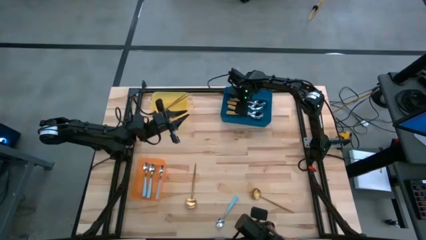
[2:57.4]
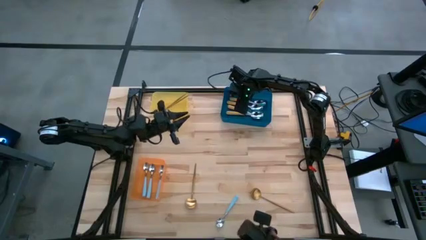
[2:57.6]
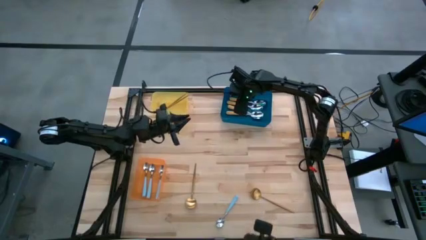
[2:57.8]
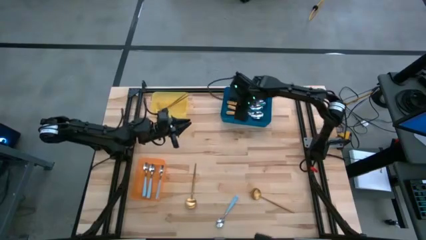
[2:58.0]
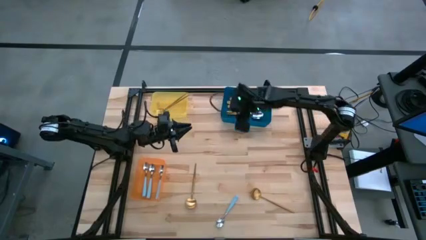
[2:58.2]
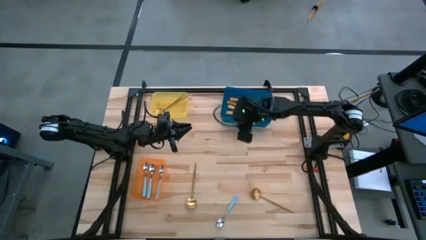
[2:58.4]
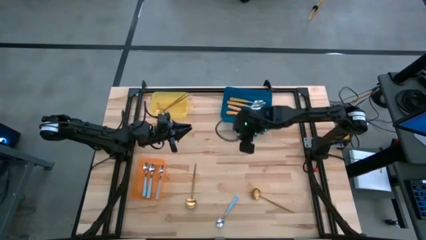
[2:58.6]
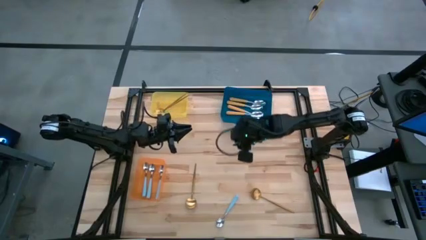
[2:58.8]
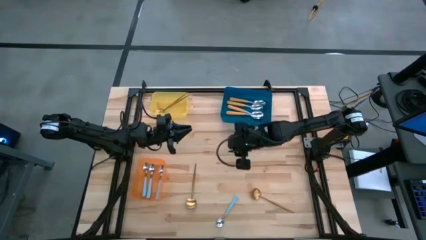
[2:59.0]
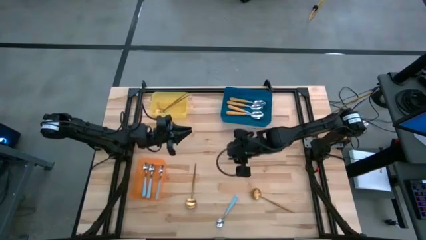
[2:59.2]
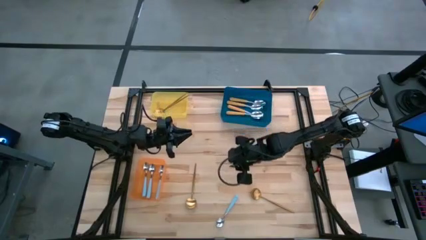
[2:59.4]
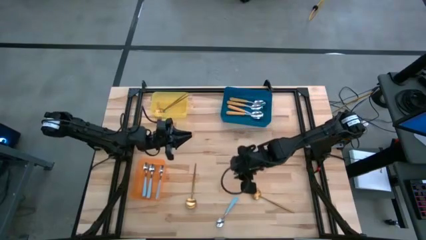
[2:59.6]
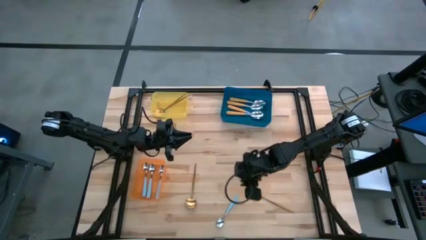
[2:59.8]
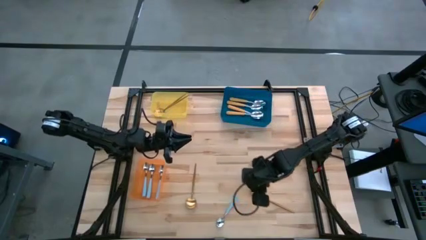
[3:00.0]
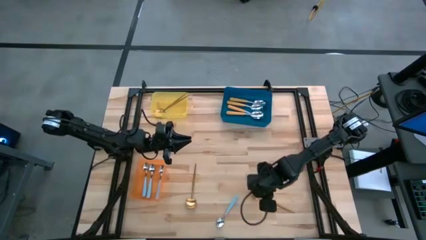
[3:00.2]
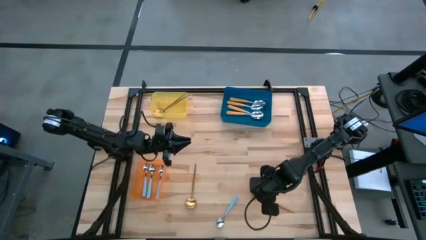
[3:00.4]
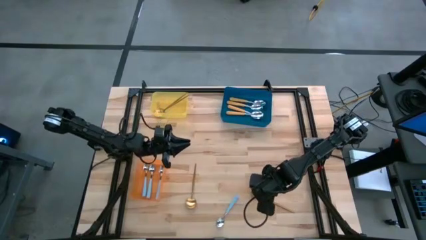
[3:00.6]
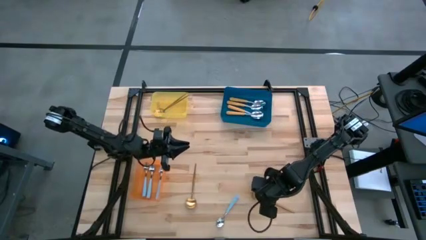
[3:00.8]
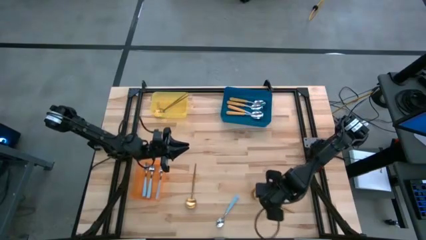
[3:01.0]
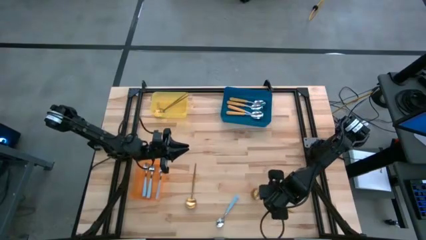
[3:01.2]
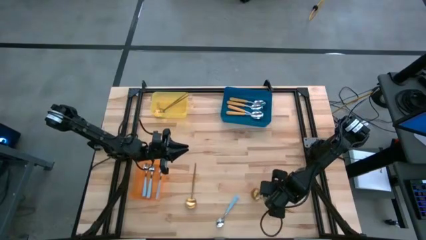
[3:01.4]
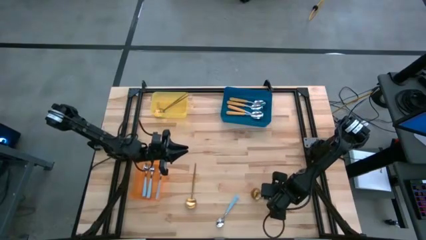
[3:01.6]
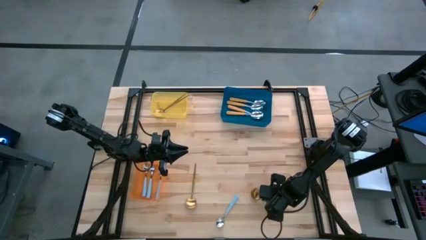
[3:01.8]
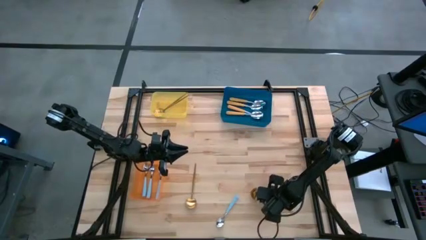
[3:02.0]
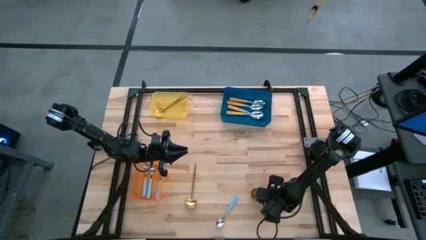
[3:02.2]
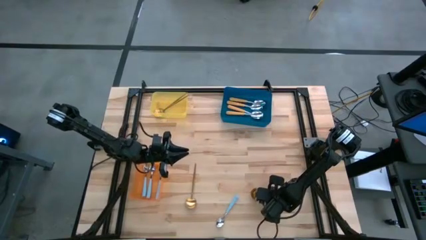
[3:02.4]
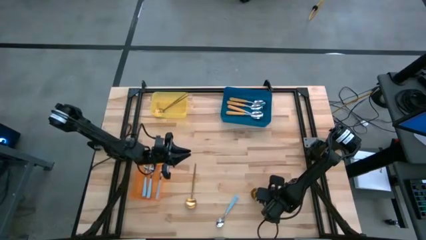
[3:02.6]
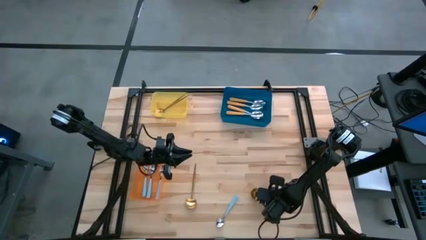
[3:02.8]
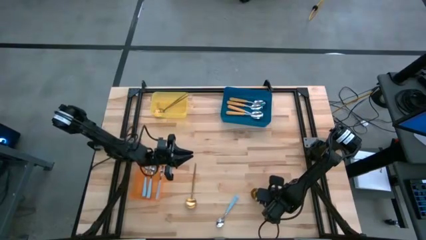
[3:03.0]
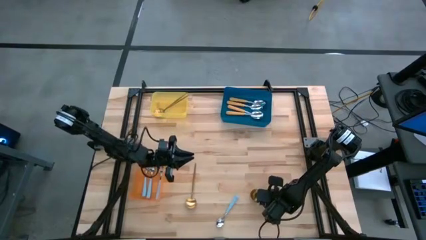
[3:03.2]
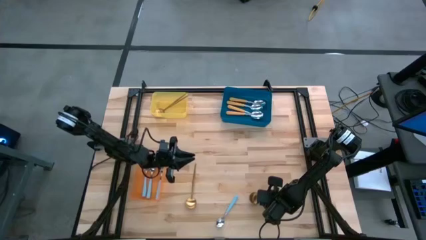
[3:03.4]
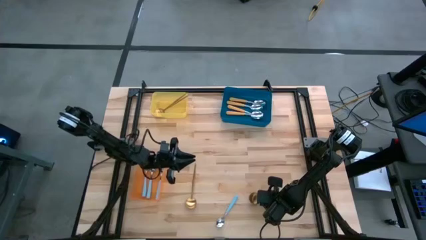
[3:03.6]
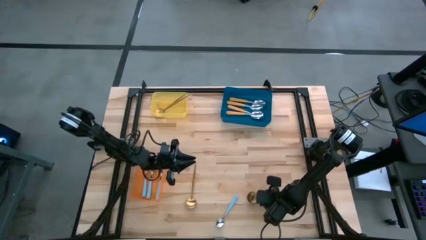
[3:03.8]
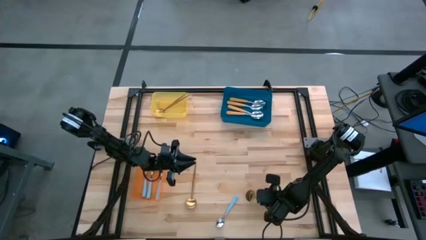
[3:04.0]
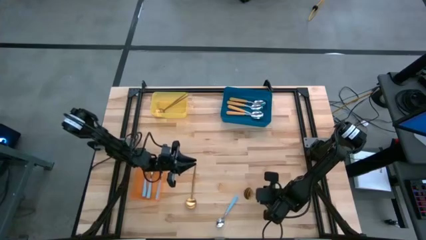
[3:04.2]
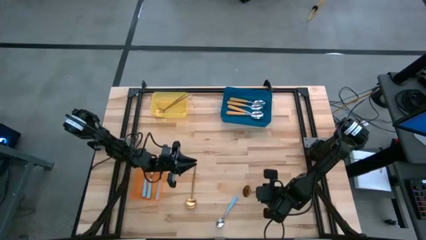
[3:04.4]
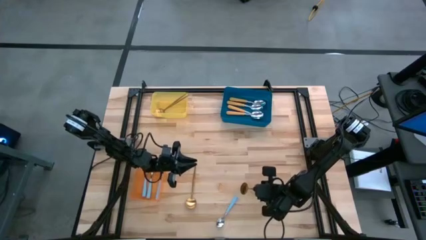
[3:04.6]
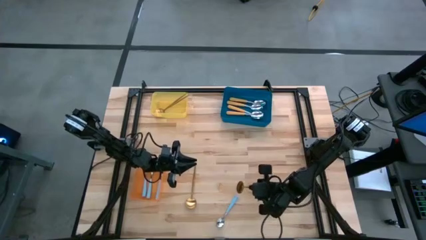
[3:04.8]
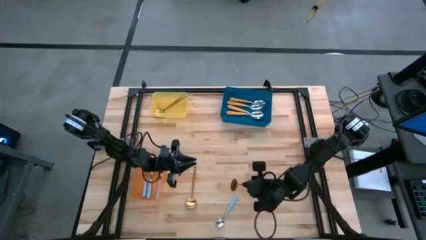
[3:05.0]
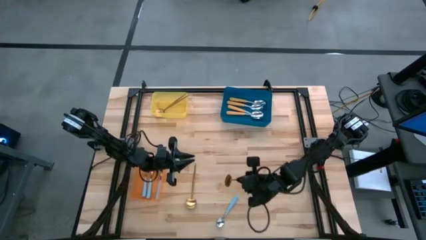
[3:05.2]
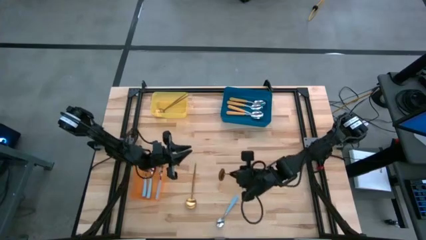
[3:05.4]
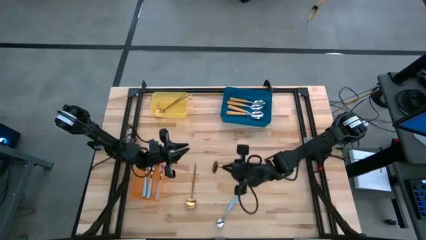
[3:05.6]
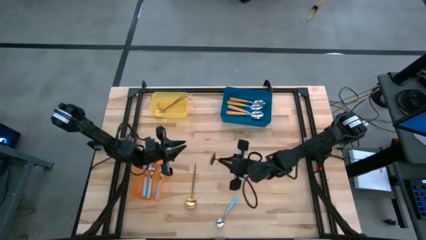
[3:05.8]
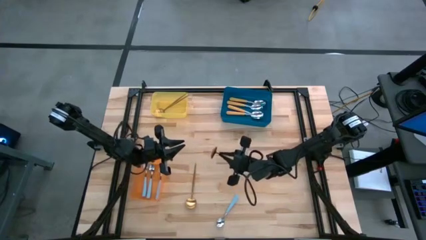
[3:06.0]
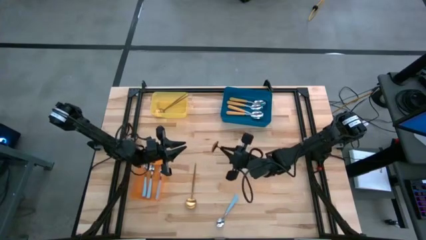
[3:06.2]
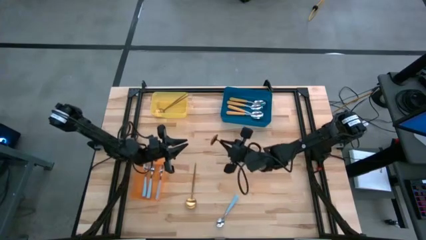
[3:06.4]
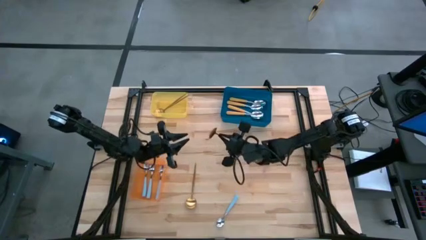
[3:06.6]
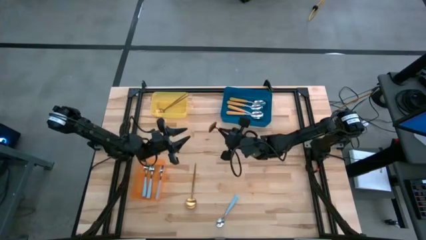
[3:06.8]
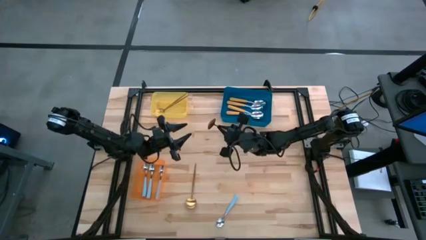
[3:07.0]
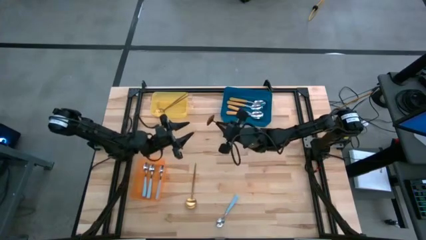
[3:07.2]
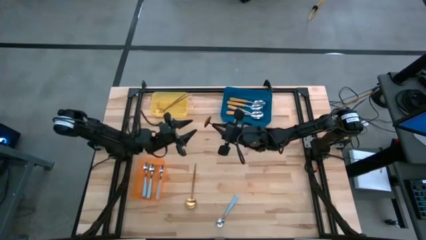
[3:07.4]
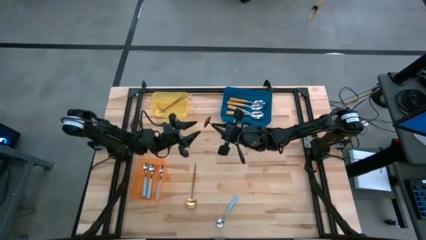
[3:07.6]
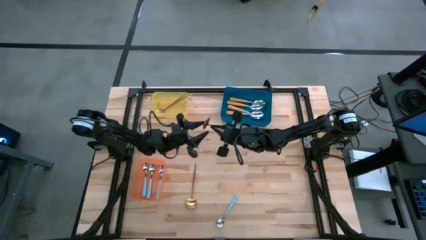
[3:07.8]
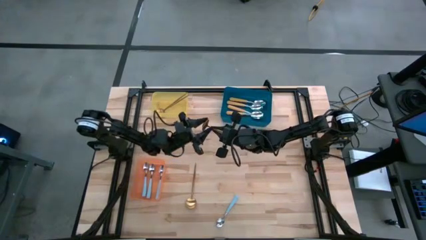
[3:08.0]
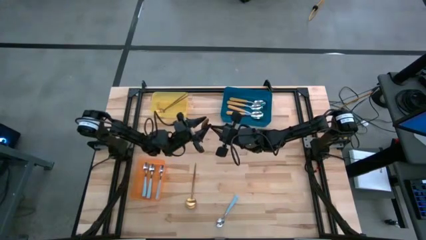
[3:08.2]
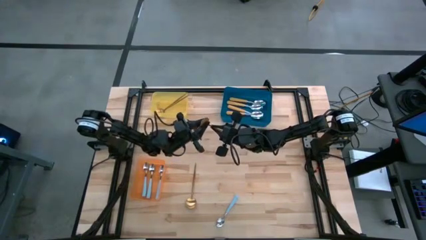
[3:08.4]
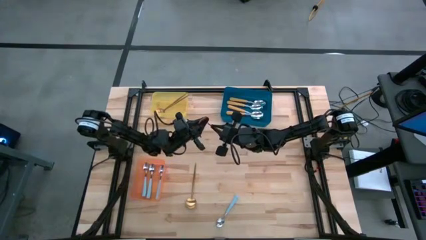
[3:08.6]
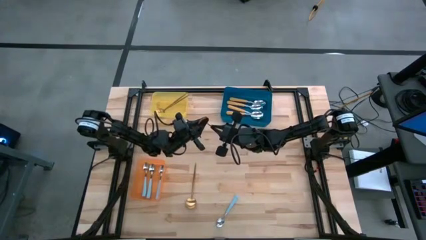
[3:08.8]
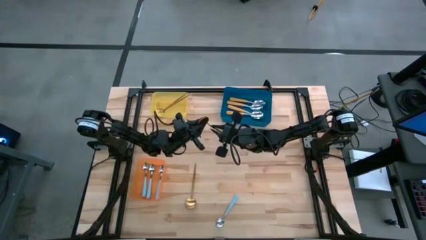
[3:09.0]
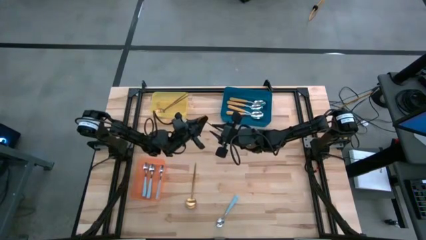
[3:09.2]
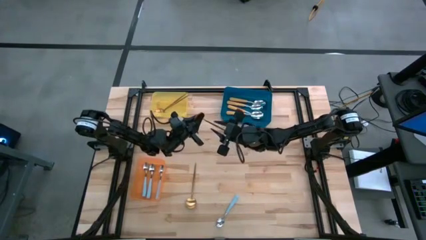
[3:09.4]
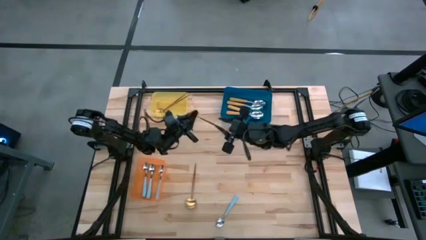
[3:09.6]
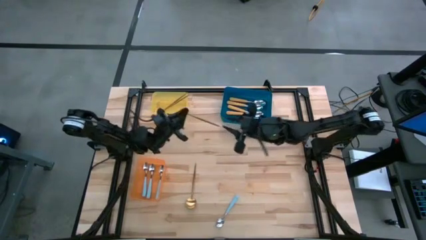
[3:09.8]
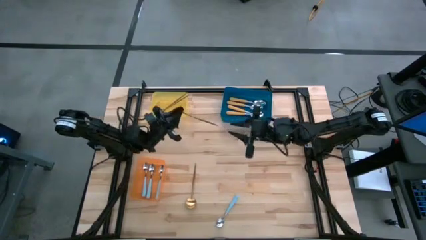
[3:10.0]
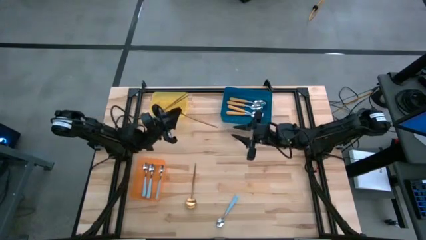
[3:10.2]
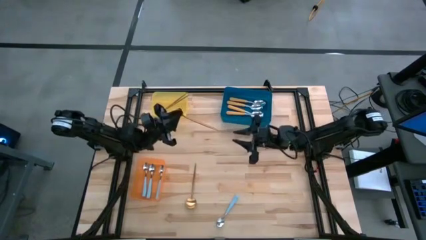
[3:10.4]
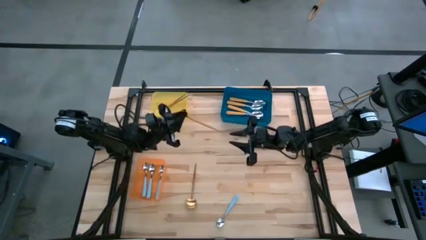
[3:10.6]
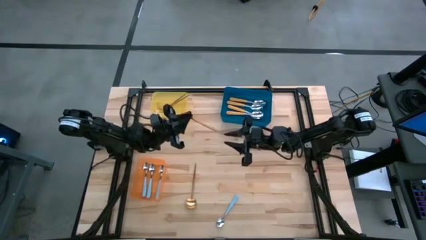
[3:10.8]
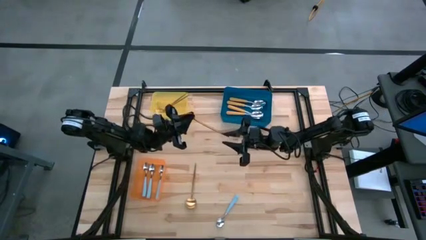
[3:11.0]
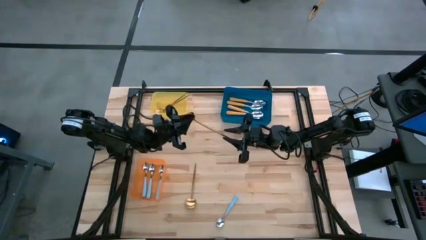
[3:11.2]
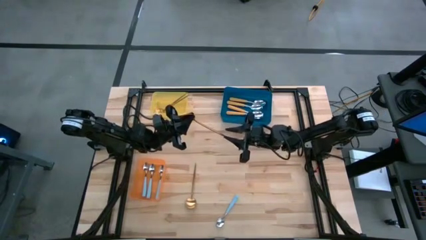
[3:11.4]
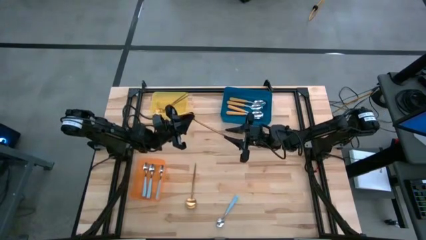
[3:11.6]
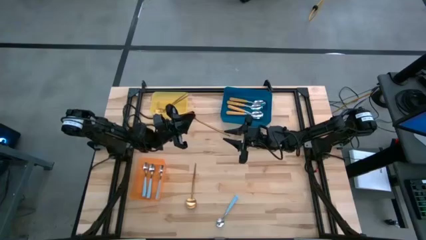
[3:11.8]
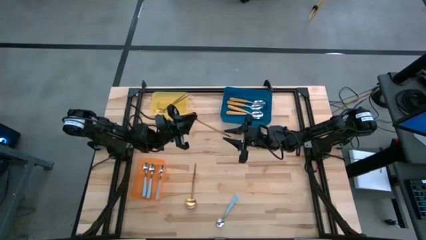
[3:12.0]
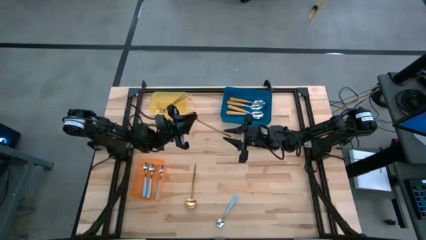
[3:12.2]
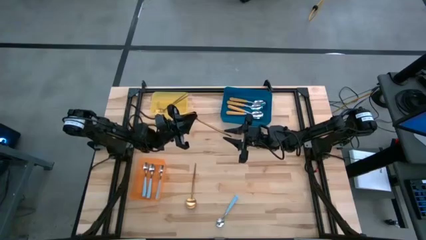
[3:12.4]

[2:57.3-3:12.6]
Task: Sort silverware by color (type)
Put the gold spoon into the yellow bin

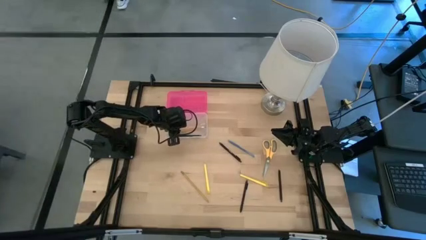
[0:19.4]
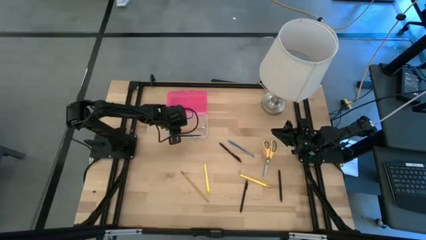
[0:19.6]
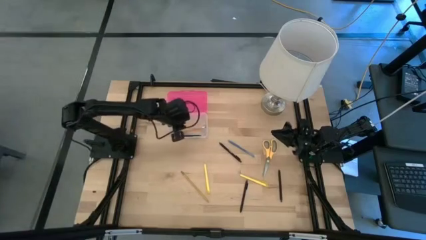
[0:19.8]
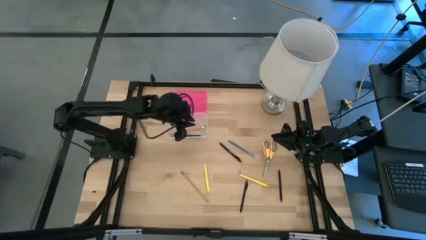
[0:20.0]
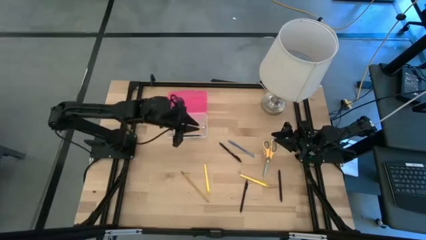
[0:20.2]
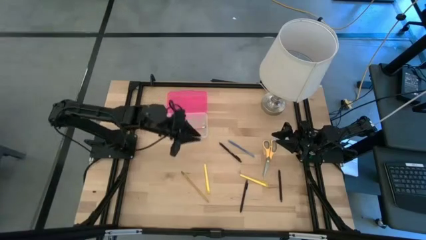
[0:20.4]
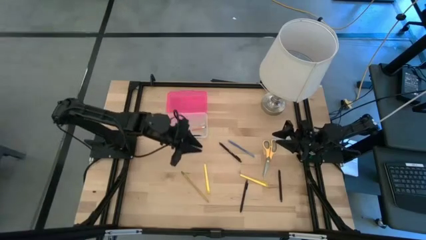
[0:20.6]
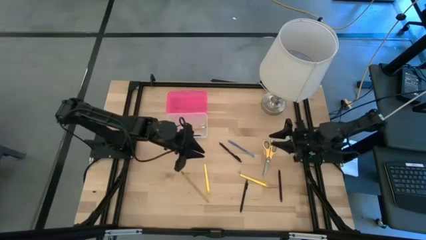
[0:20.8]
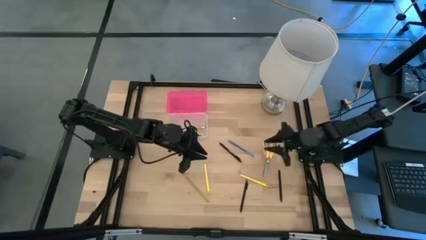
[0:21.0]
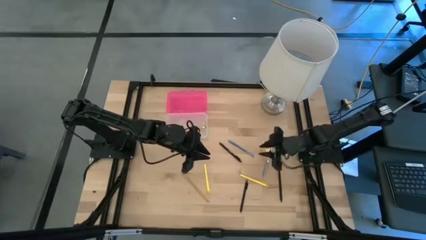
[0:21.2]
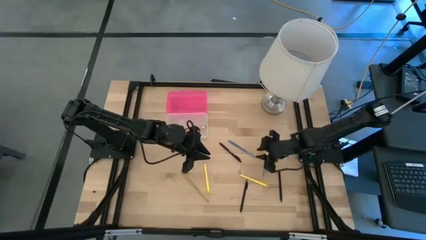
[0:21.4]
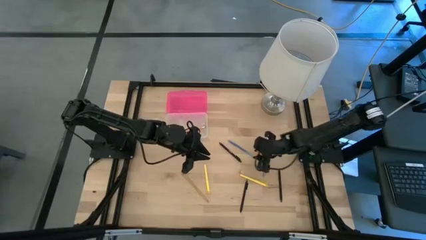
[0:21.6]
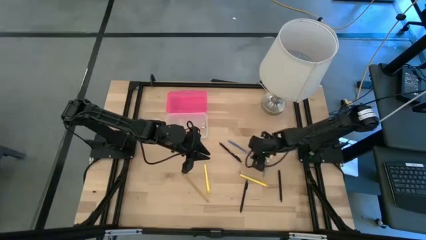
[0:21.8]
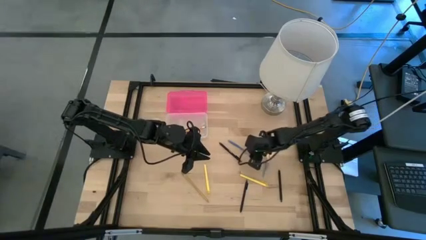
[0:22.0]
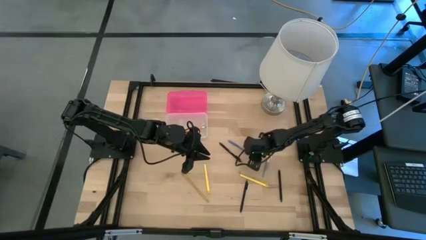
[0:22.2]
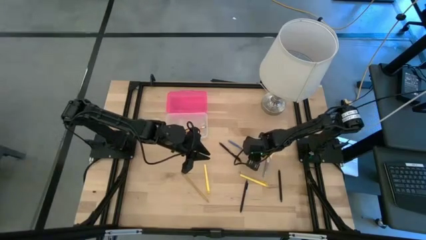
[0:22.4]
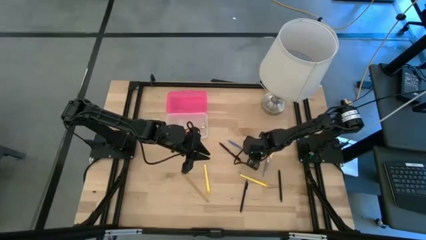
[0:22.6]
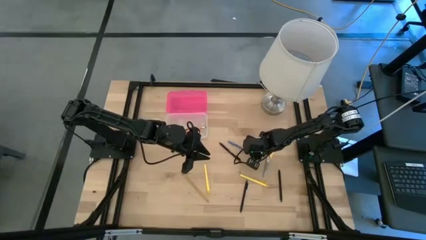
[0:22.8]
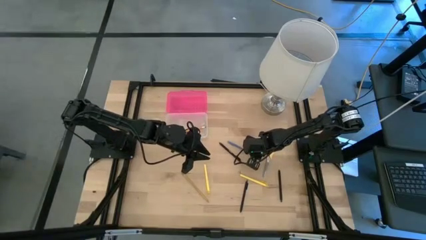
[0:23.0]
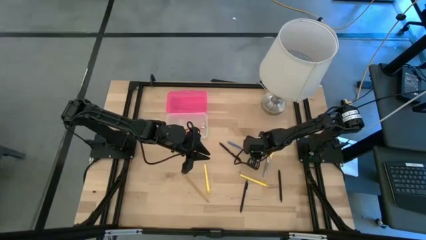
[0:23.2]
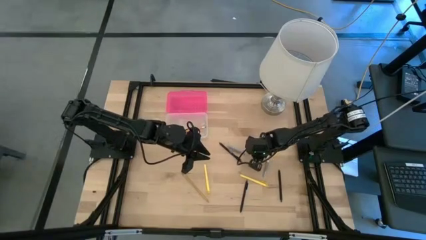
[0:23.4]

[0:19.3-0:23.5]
Task: Pick & place school supplies into a supply box
Put the blue pen into the pink supply box
